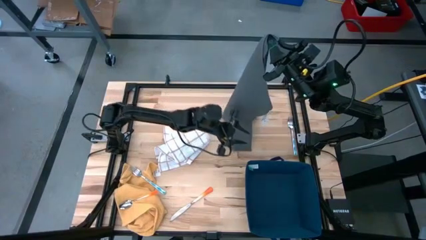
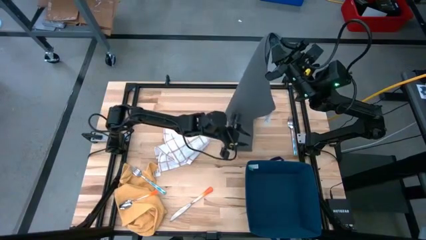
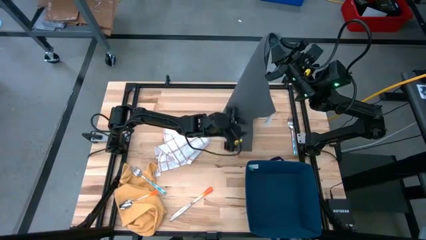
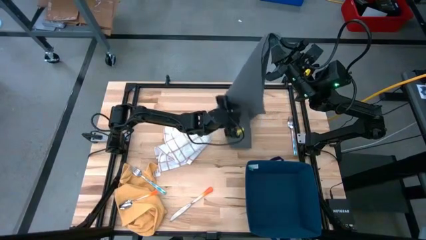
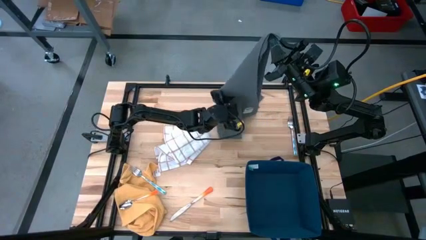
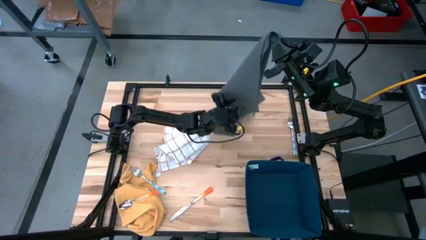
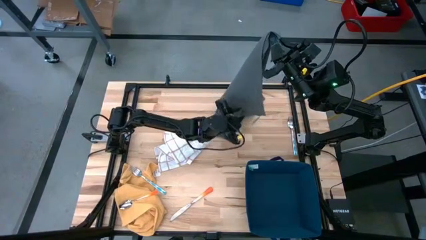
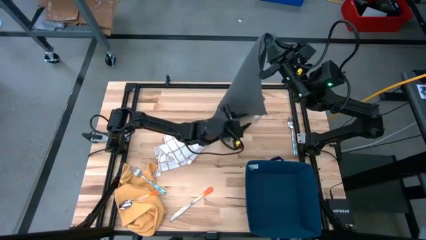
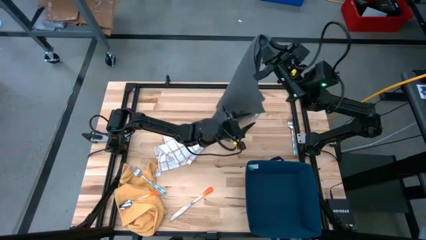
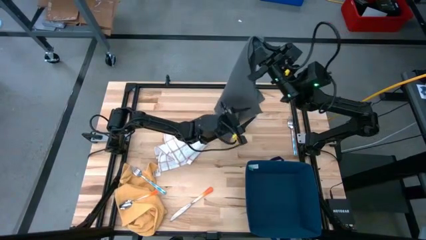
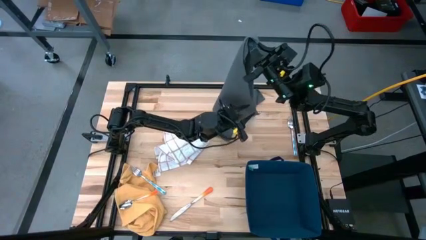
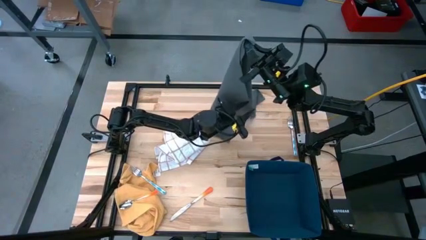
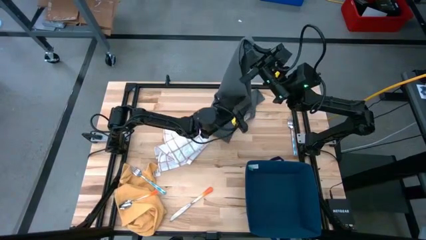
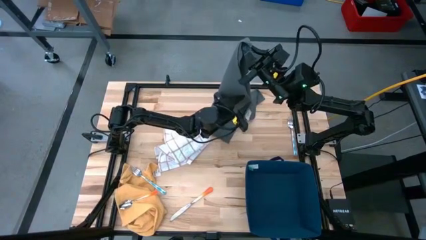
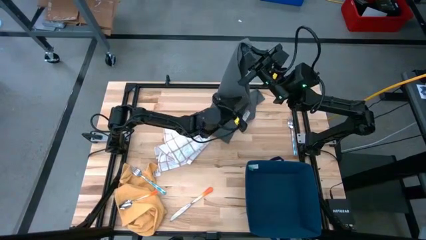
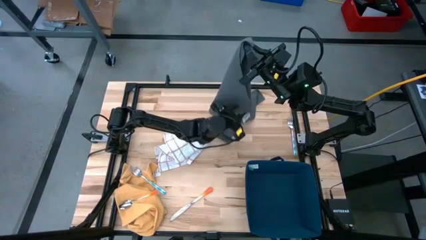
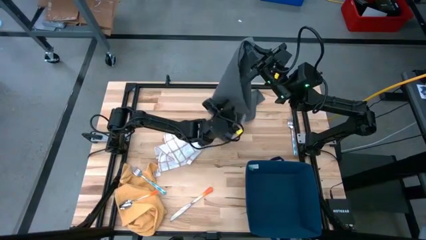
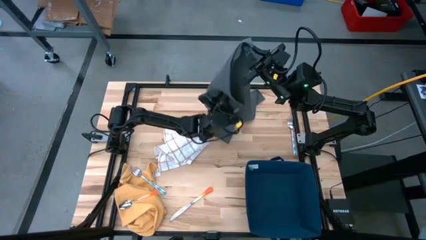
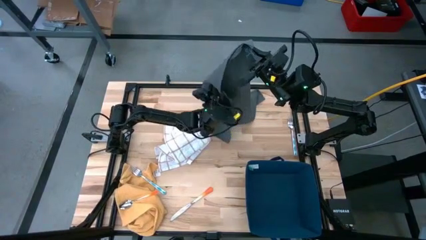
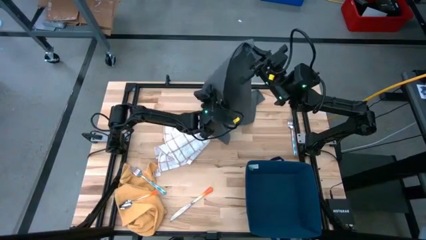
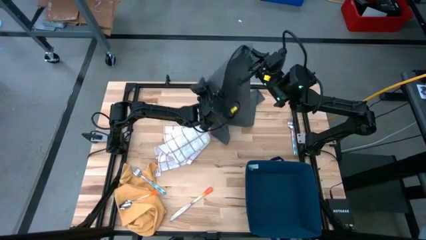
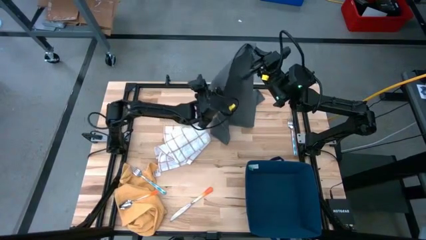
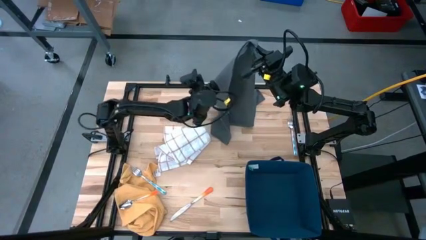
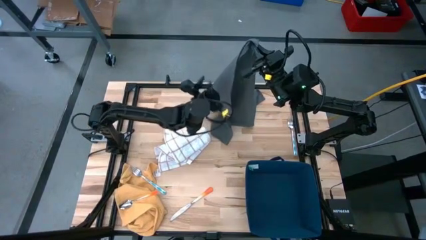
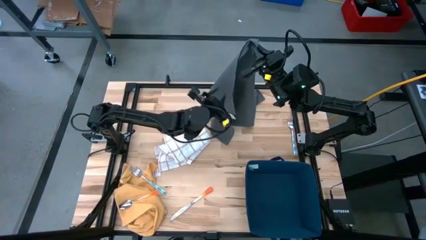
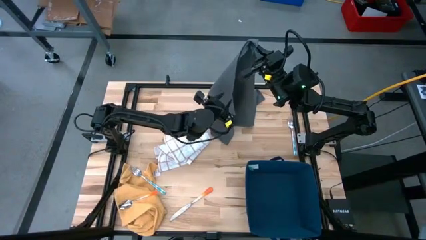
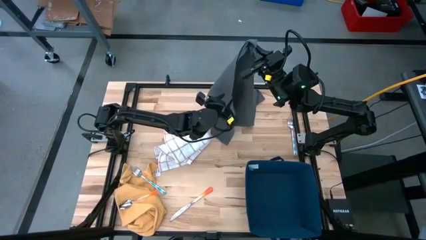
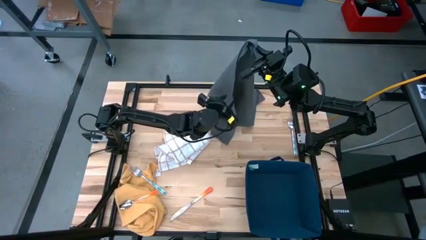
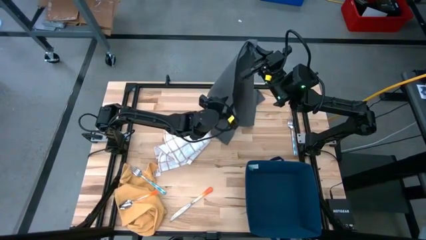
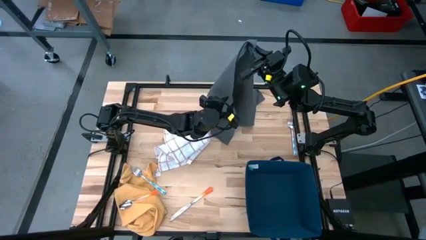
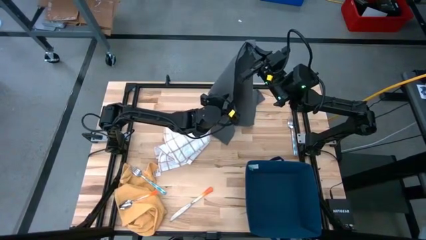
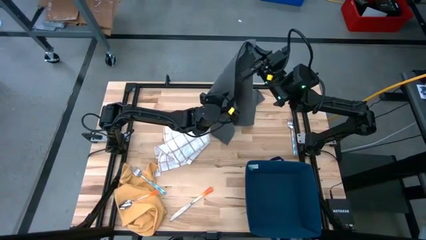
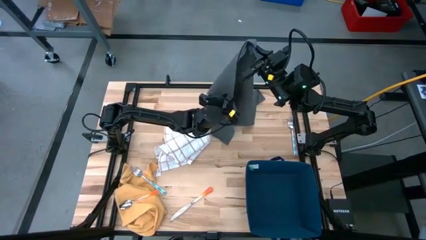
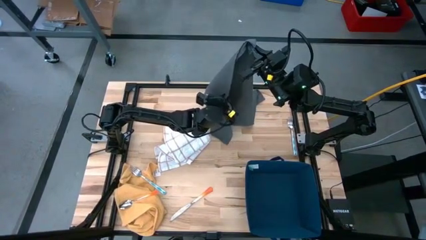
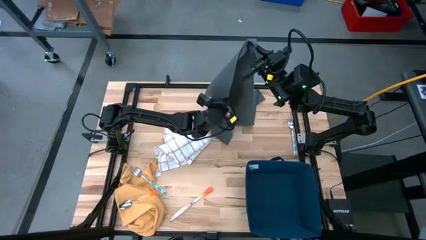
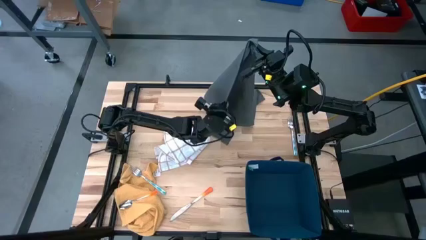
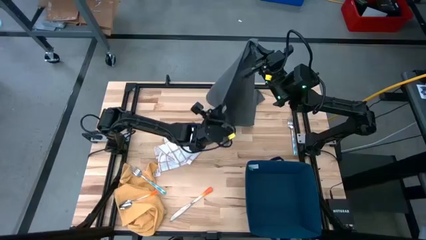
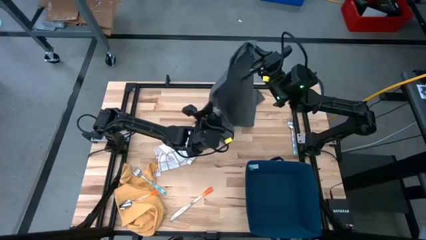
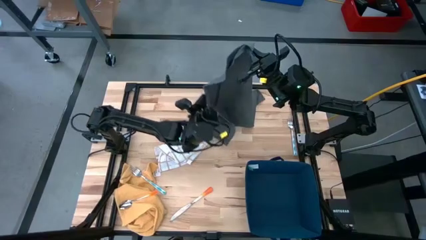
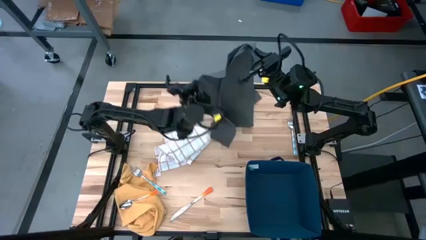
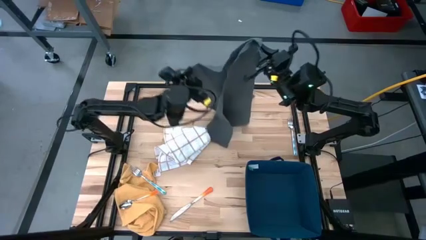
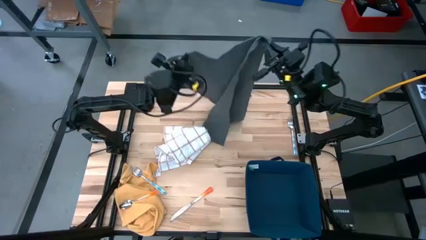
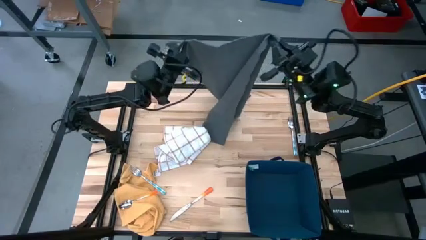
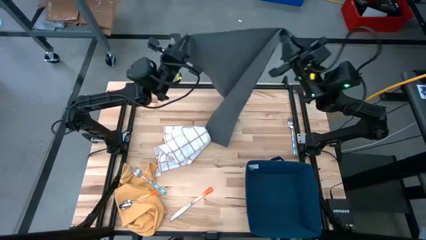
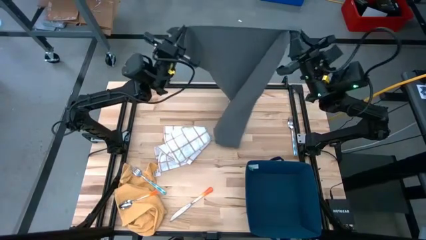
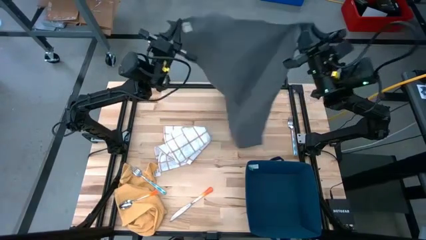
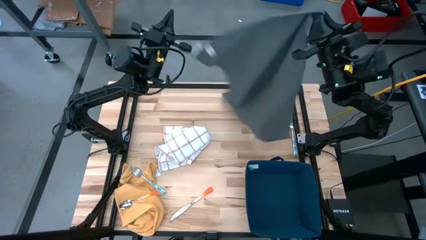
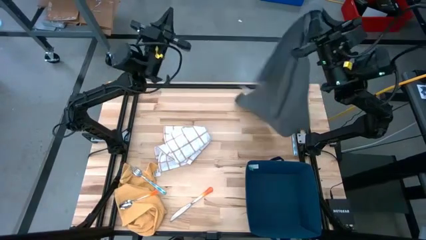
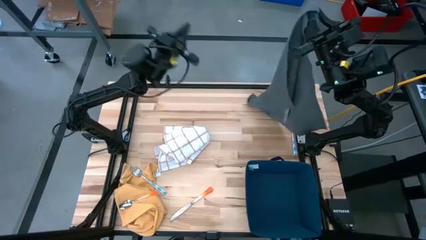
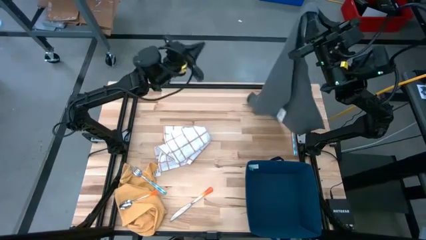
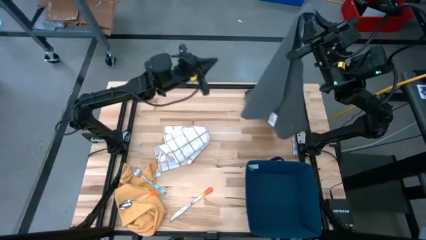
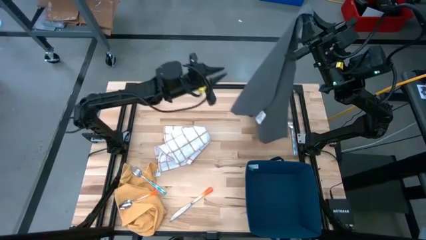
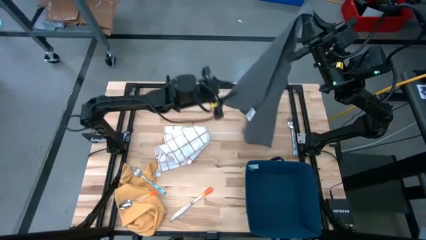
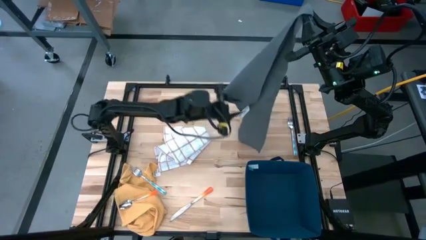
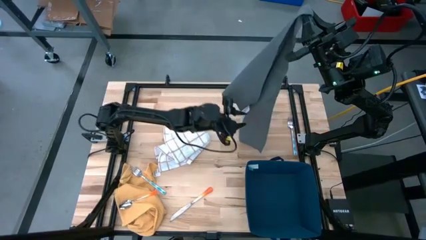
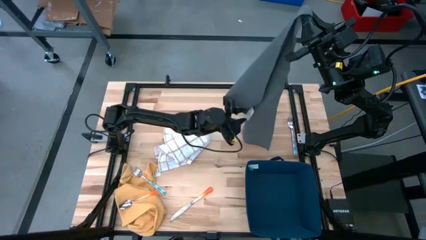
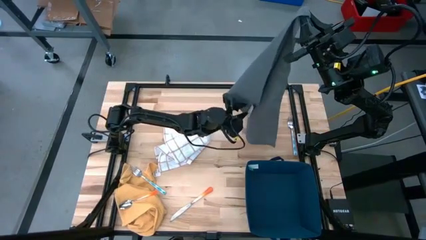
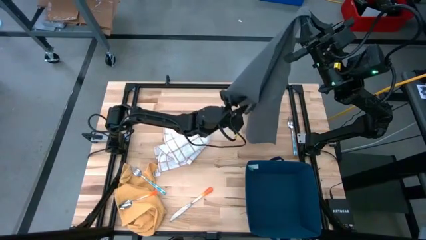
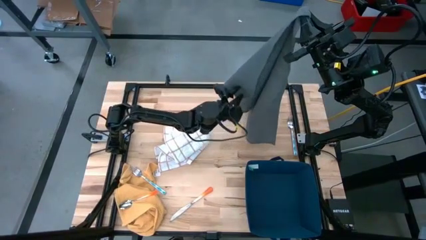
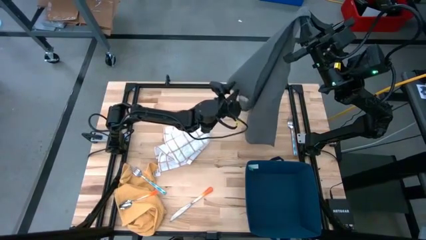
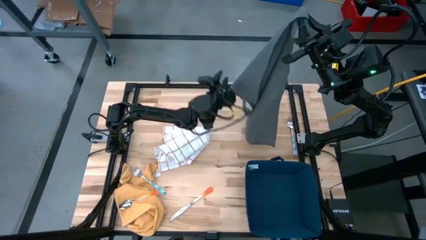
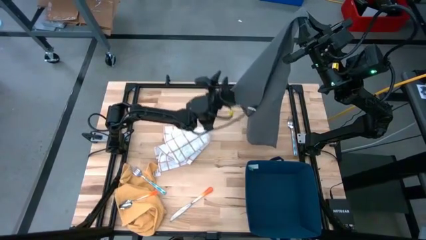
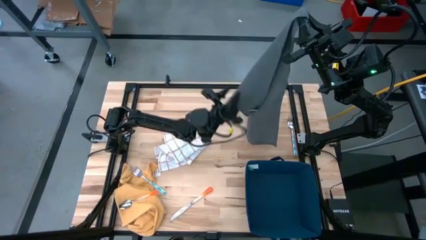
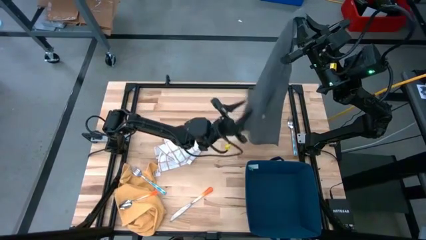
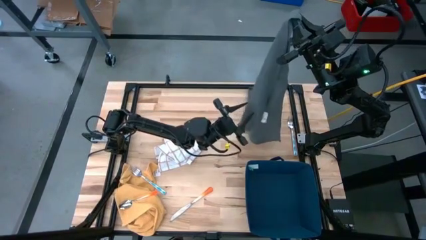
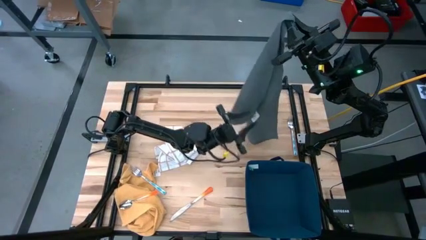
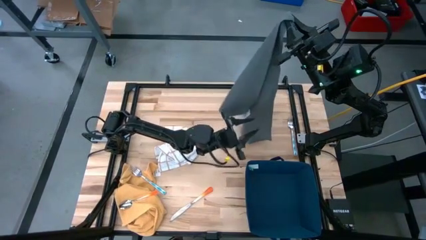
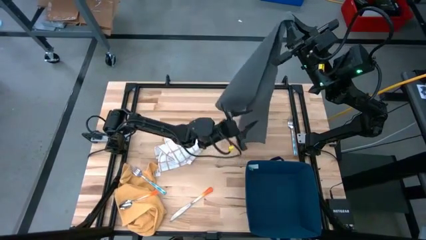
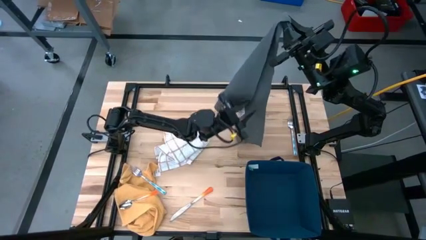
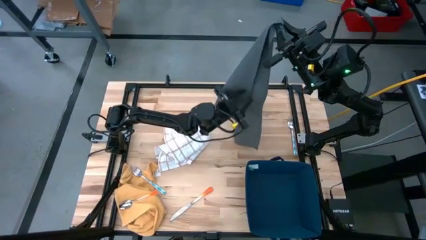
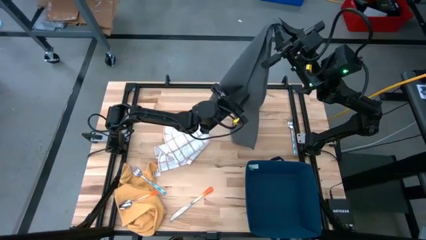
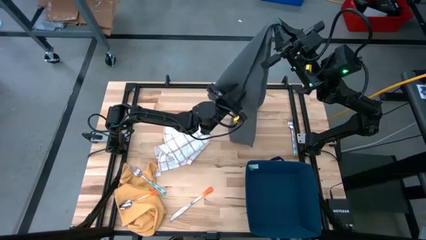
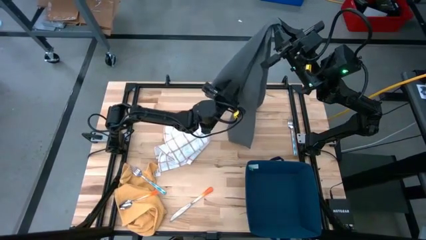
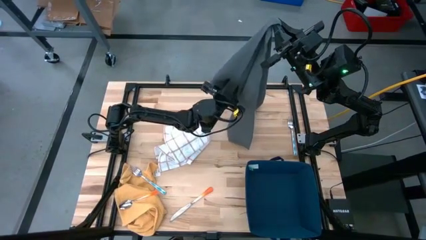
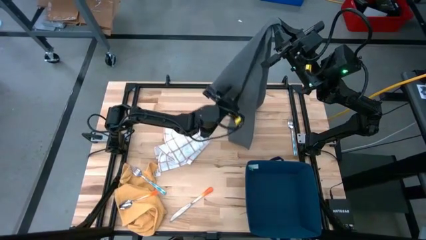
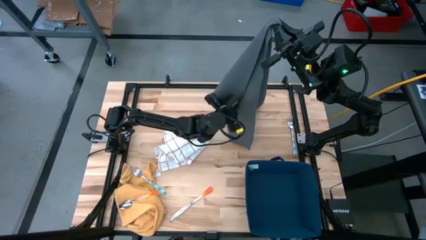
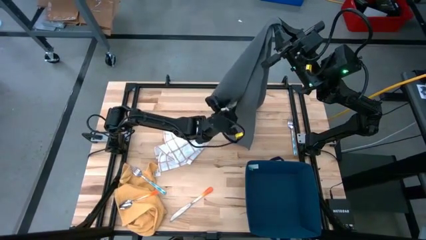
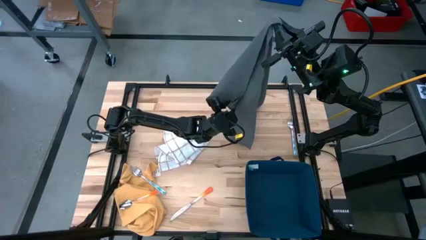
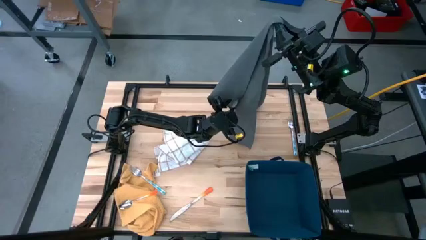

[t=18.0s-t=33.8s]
Task: Fold towel
Fold the grey towel
